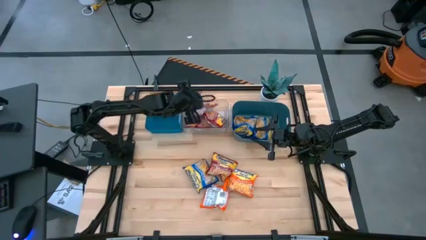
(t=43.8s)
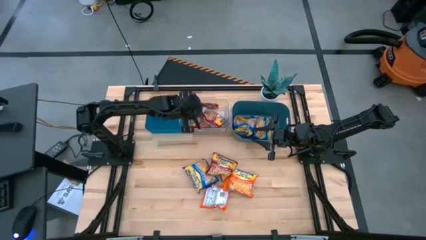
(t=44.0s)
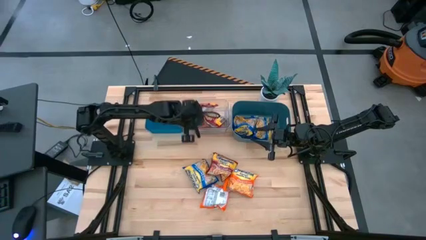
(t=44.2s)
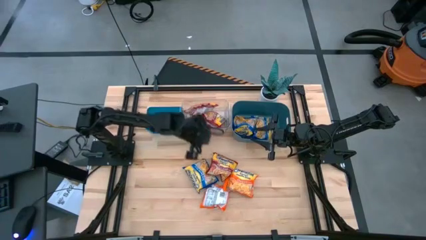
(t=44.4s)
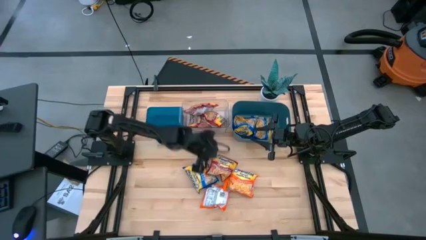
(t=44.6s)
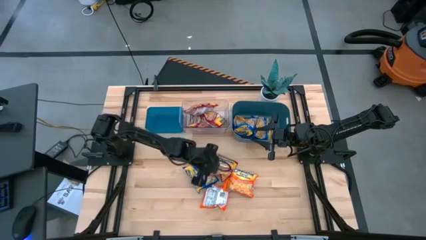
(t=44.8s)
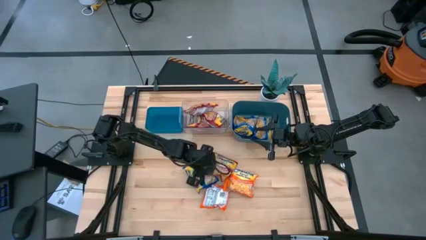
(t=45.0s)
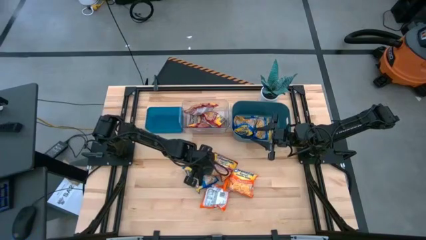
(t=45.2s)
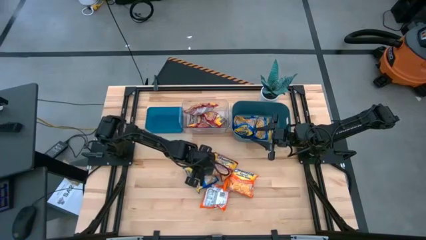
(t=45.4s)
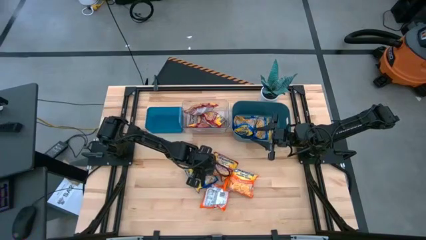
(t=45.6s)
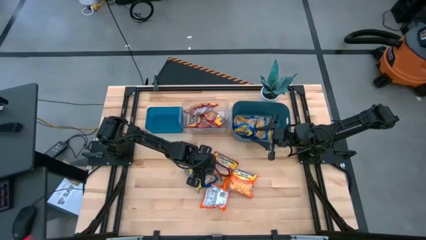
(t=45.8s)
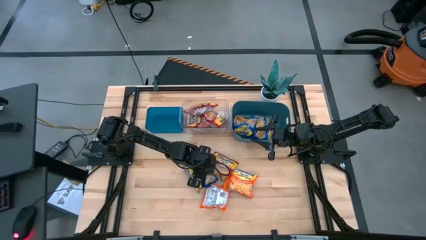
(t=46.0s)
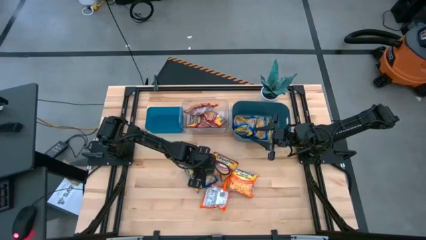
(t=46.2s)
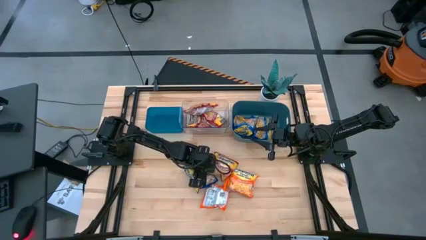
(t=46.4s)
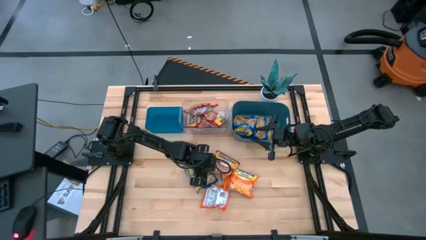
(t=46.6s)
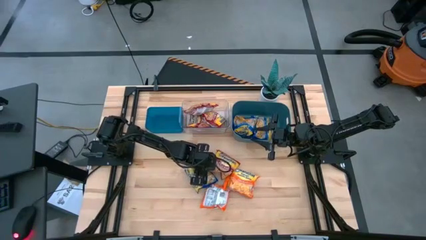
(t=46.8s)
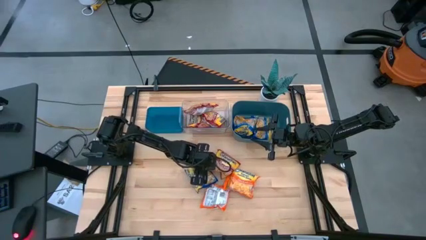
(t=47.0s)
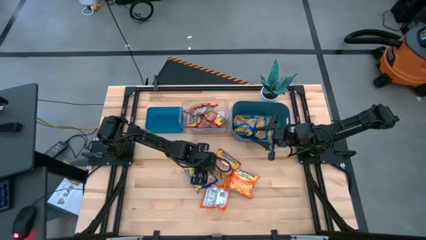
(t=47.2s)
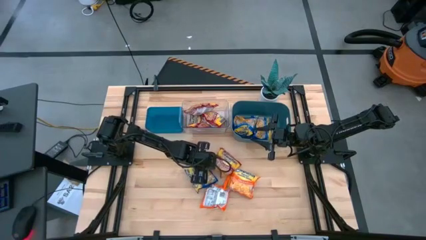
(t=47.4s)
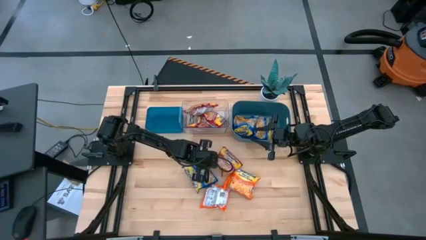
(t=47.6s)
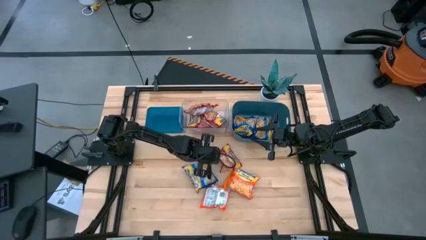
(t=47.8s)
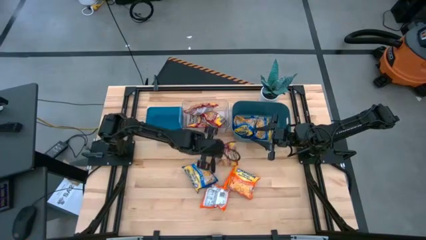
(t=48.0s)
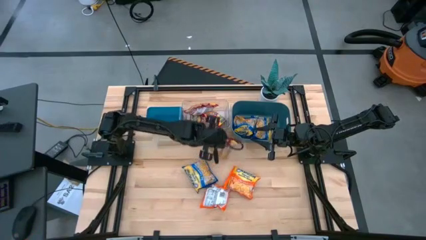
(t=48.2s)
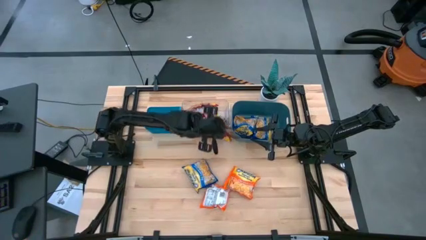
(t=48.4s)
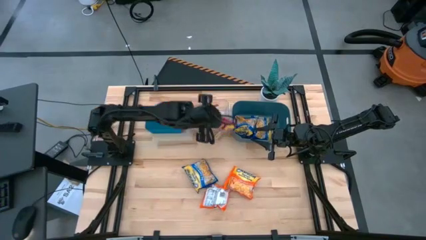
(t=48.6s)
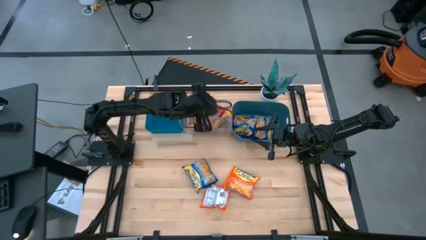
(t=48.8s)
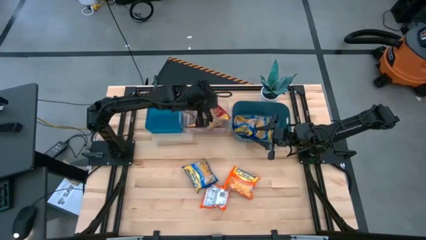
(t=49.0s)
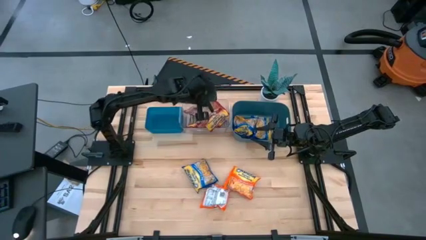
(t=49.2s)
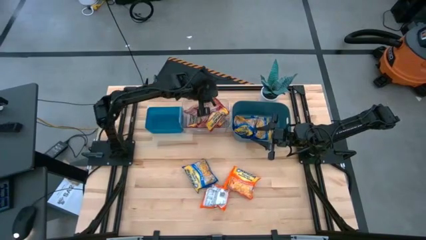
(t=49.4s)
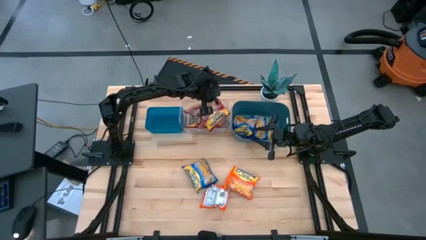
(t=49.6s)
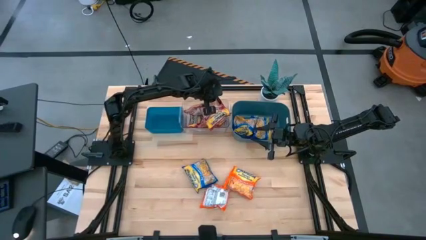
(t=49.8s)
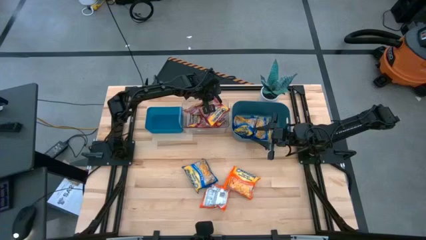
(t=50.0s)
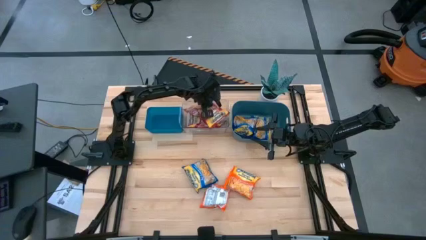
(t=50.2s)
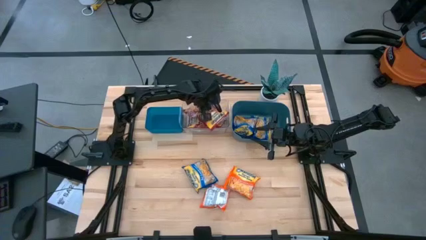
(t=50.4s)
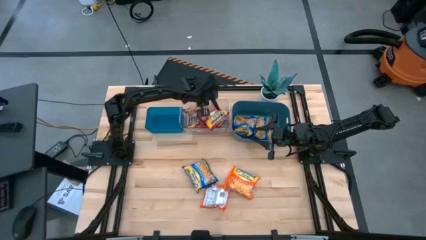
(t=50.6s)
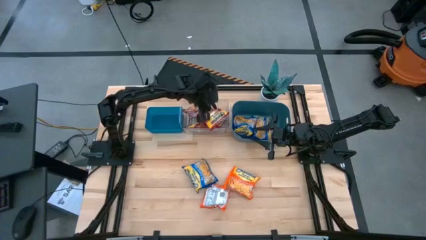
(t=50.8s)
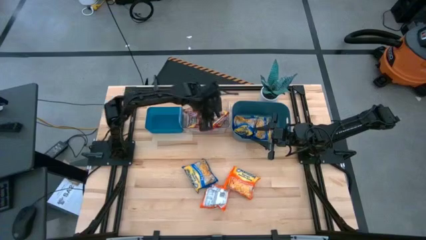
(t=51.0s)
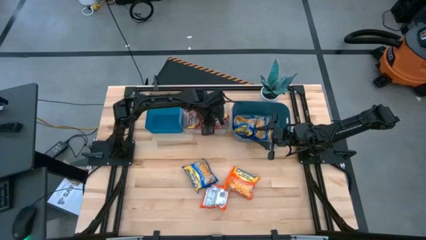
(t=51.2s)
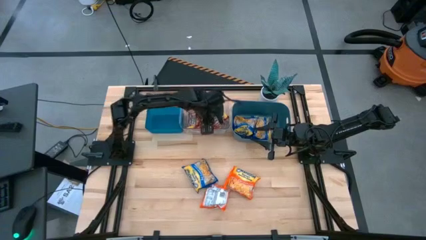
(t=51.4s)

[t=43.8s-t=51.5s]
Task: Sort Maruchan noodles
Put the red noodle pack into the transparent bin

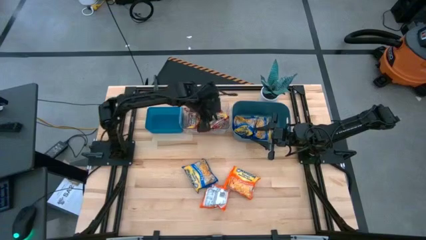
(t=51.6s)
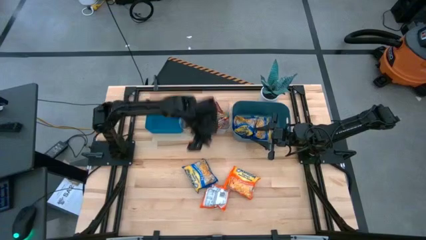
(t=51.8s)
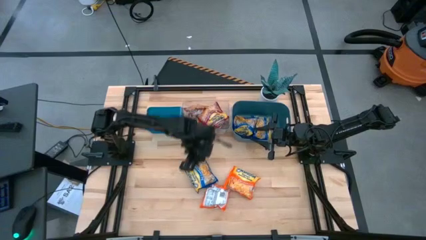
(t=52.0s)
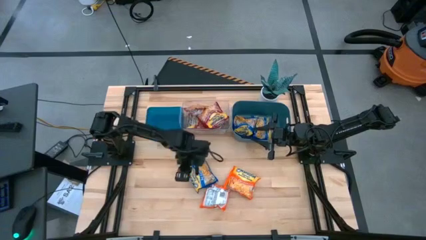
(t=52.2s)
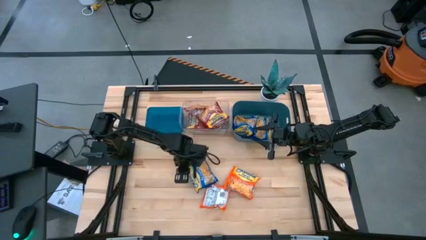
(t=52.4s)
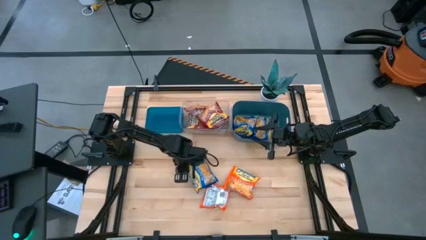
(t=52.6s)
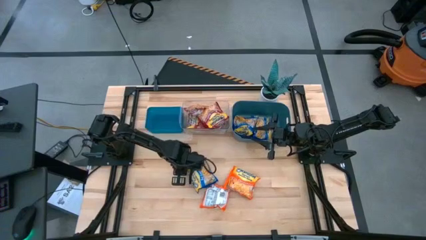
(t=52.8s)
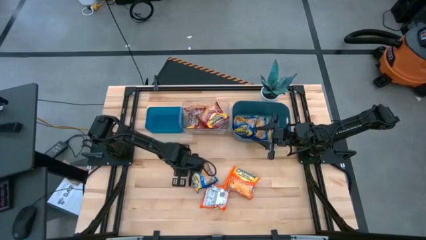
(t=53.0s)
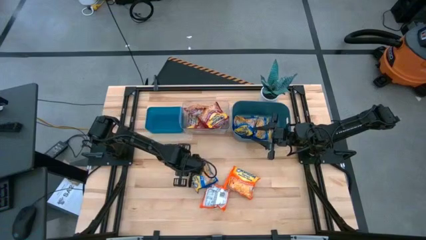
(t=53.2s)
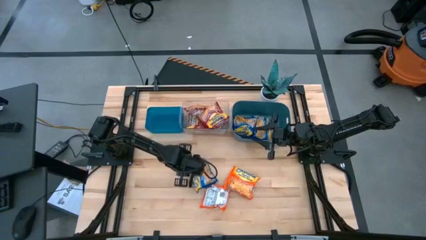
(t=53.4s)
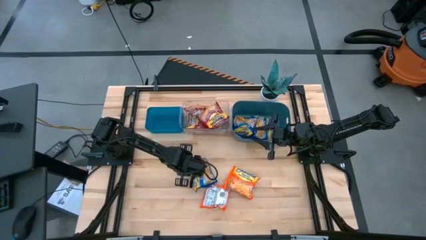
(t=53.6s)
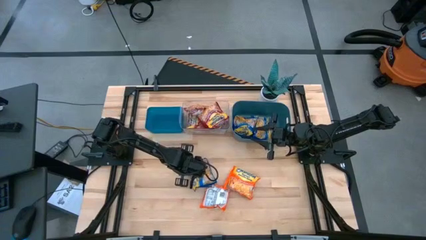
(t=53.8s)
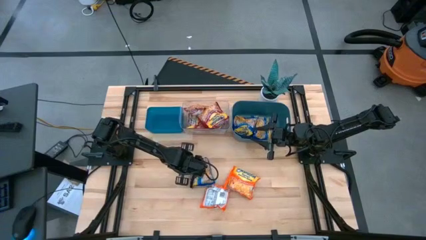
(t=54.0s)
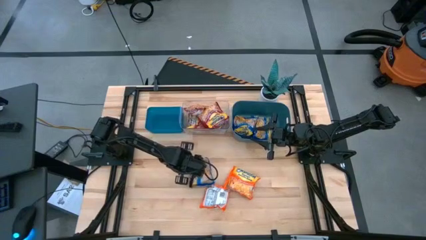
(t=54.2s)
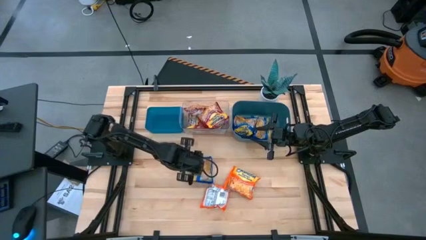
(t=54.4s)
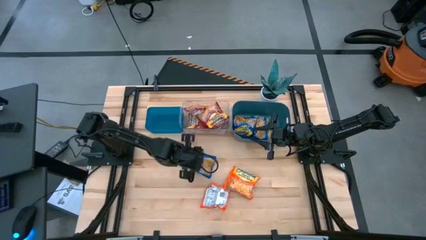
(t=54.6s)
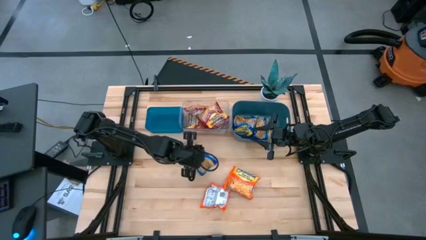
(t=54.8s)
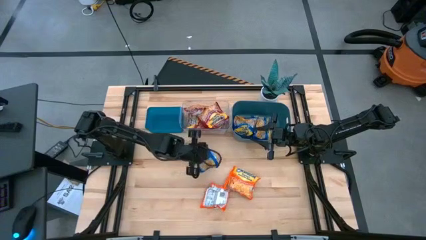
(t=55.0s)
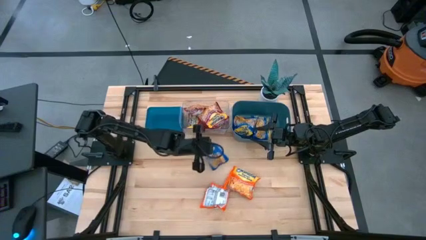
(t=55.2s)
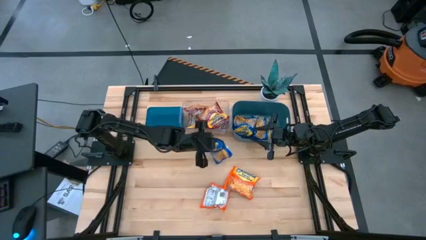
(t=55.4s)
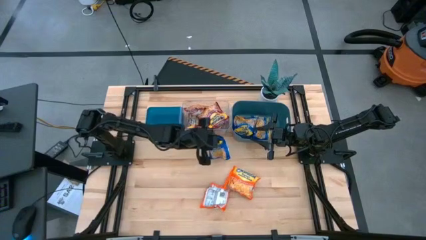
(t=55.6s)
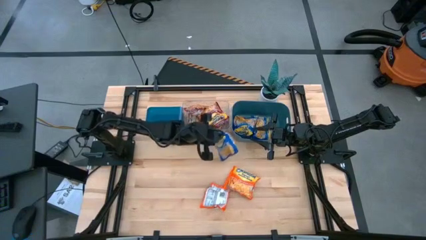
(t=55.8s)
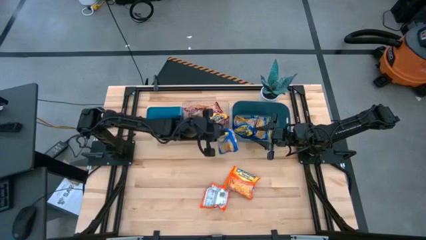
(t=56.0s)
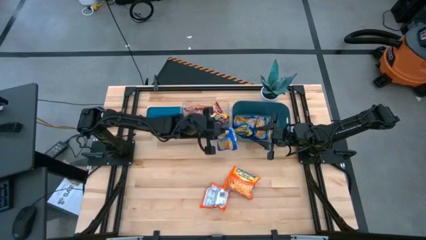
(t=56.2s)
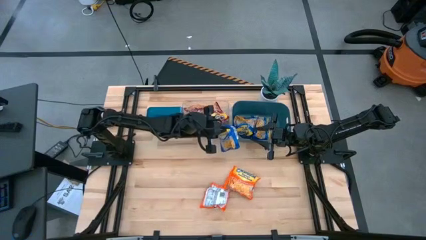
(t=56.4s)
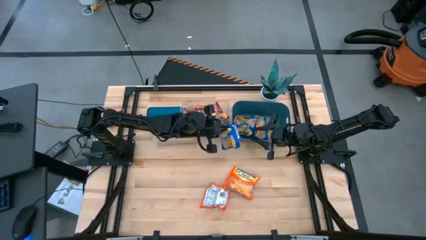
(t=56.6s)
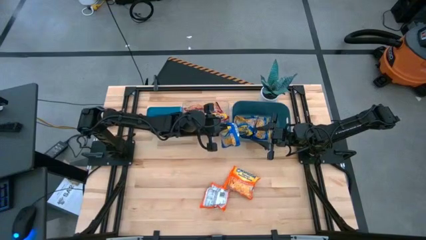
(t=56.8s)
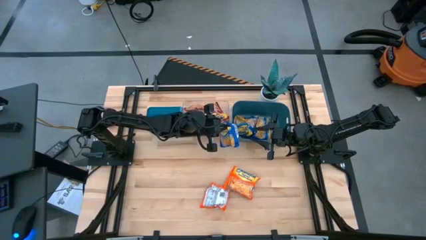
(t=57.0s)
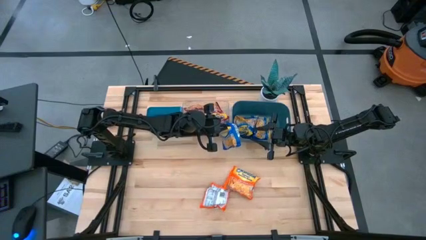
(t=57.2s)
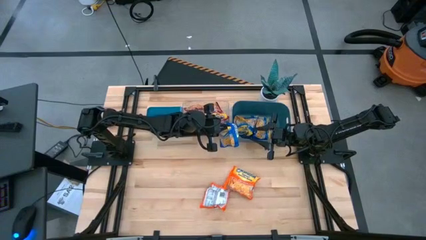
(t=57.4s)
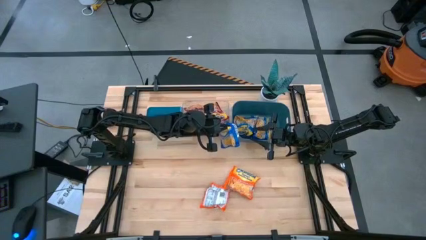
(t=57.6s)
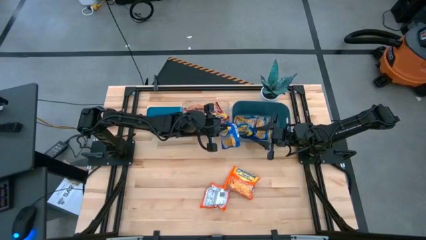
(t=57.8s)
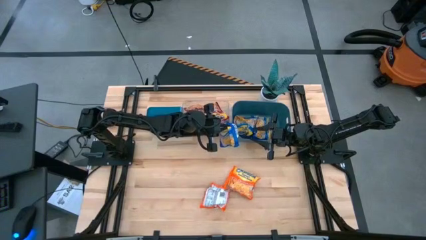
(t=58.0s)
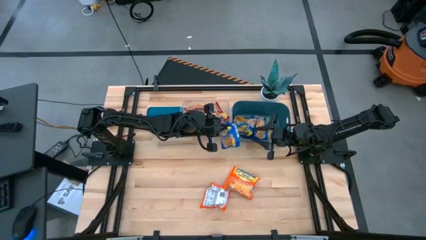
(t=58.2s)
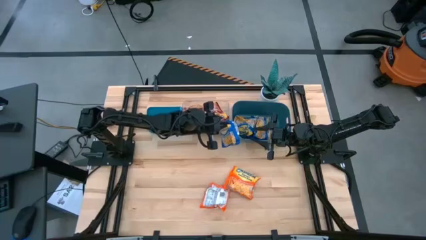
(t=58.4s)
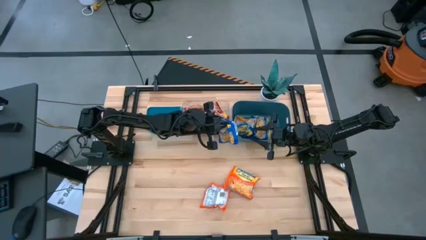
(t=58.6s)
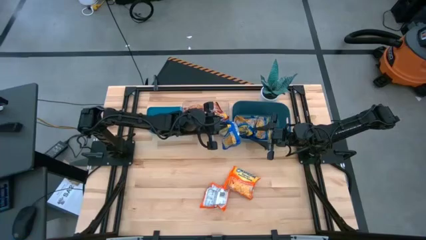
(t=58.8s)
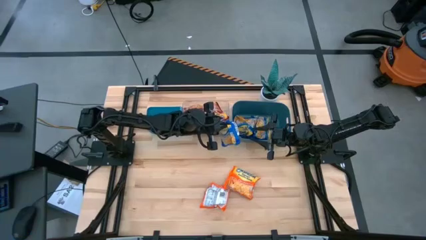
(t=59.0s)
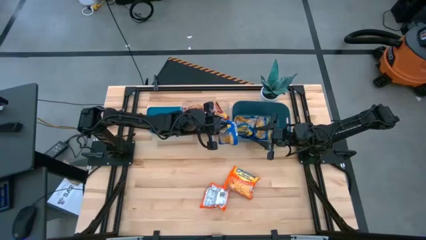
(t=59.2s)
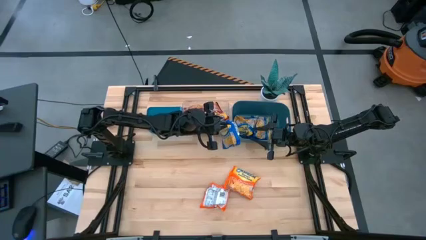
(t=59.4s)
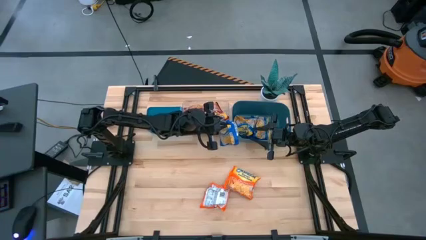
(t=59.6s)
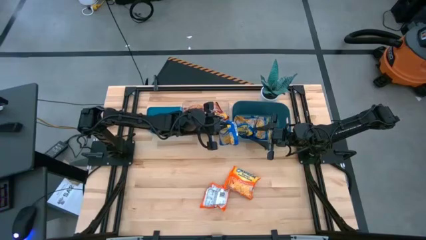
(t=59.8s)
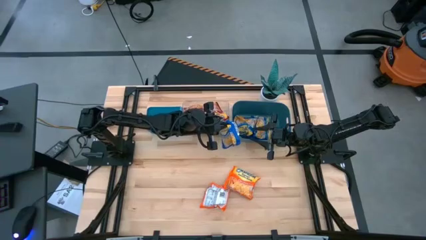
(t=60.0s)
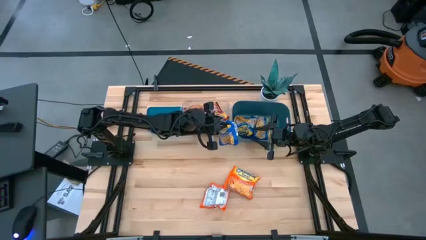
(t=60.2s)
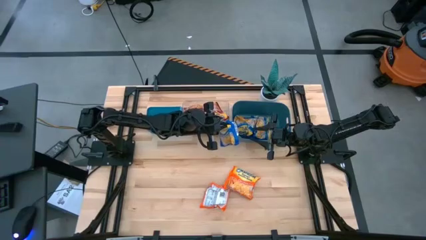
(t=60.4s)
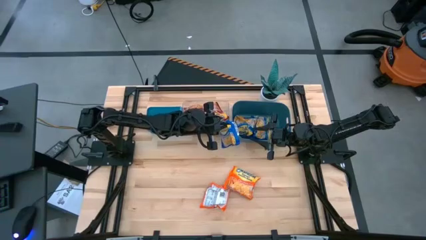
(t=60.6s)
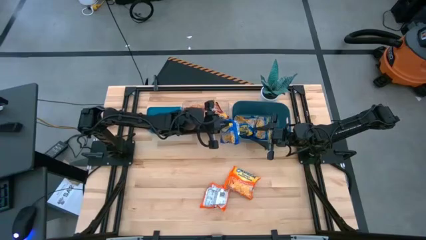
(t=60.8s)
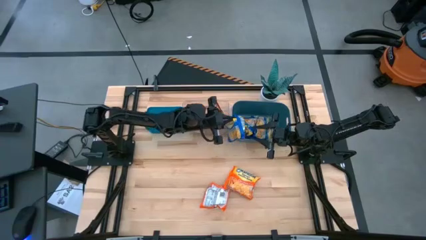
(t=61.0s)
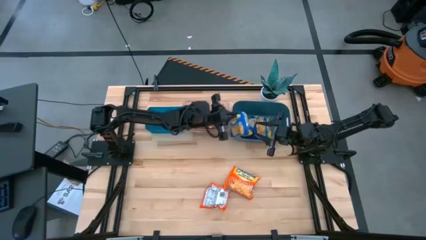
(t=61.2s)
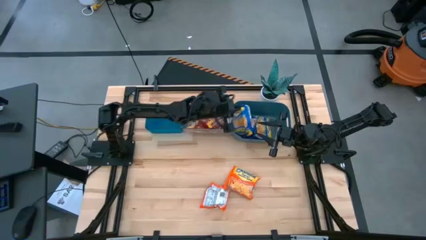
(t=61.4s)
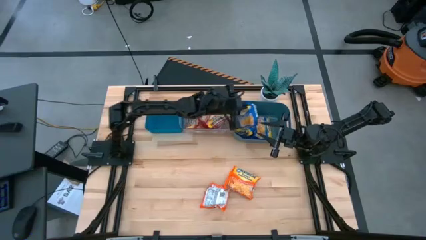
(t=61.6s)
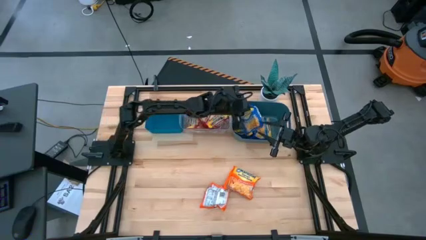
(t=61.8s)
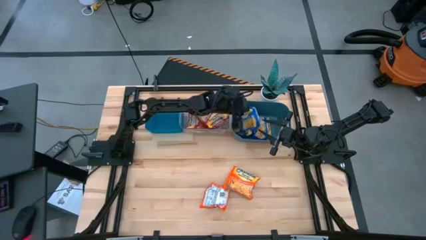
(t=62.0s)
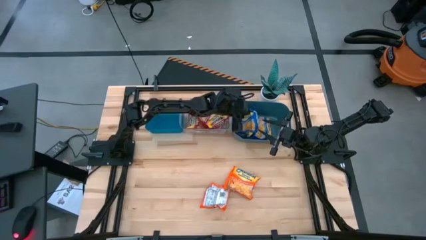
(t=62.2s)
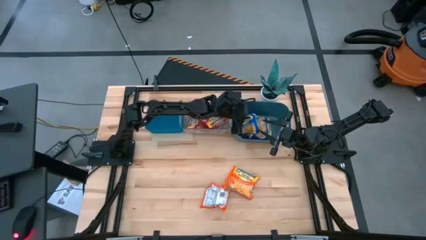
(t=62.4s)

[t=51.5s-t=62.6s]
Put the blue noodle pack into the green bin
